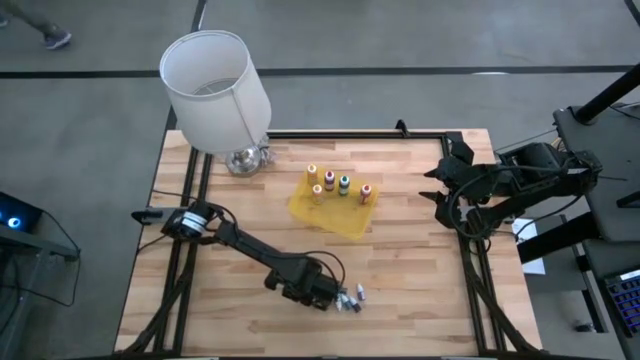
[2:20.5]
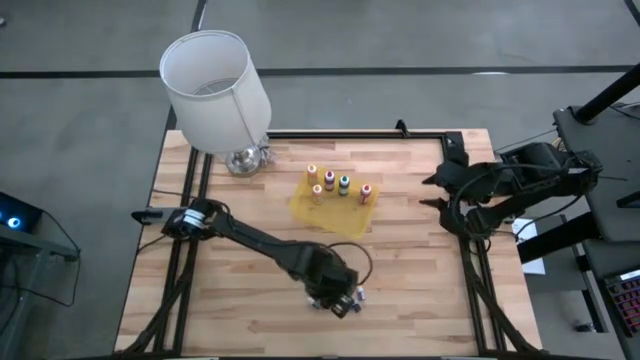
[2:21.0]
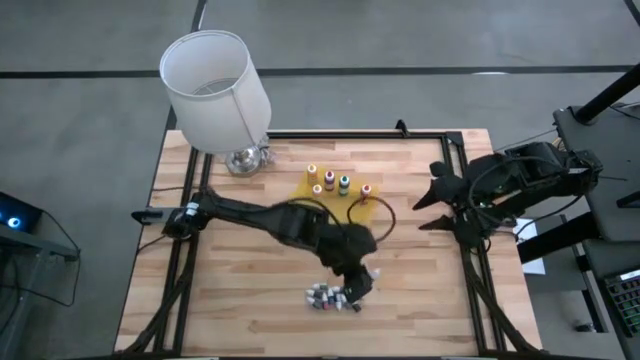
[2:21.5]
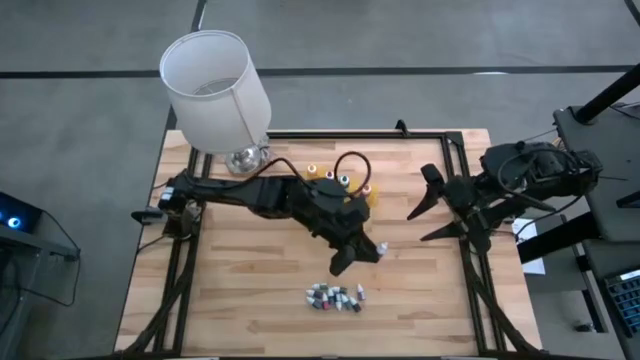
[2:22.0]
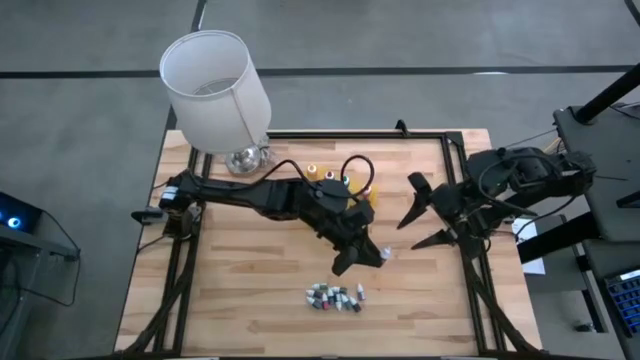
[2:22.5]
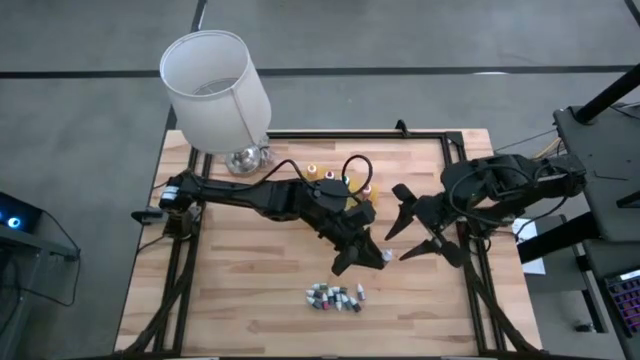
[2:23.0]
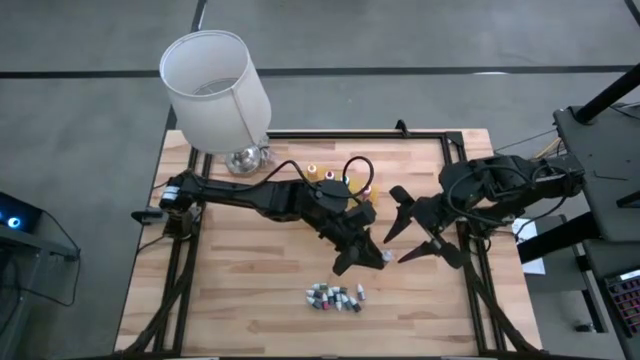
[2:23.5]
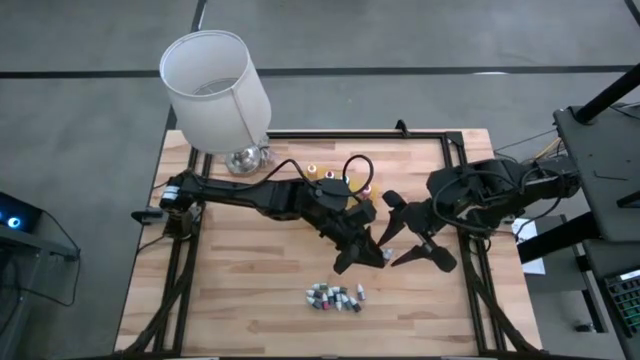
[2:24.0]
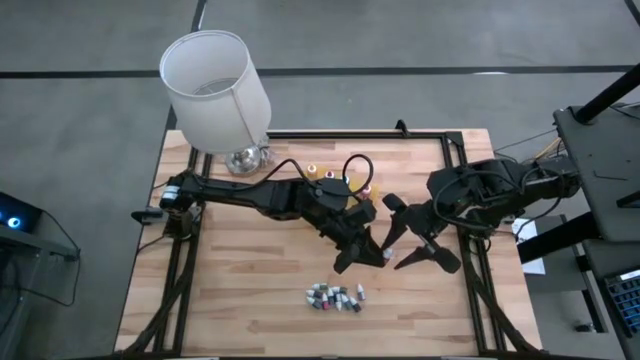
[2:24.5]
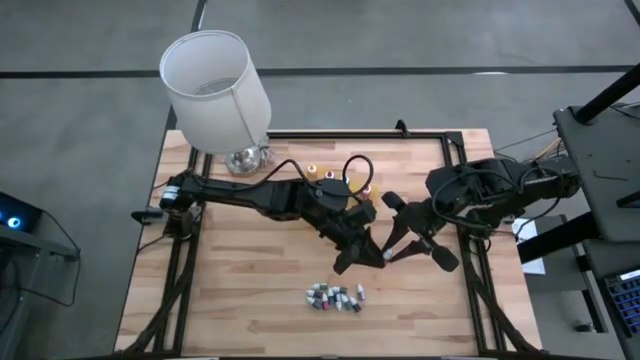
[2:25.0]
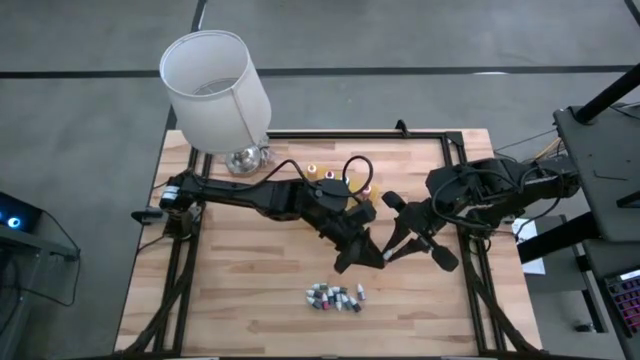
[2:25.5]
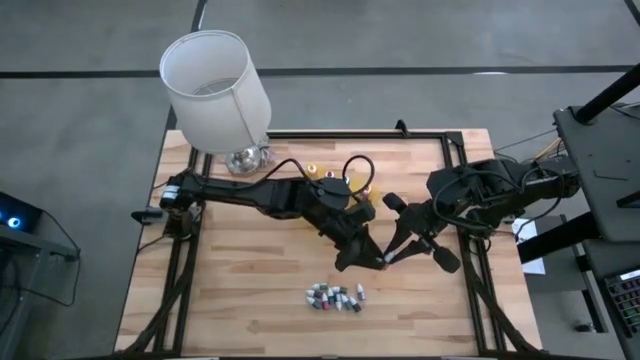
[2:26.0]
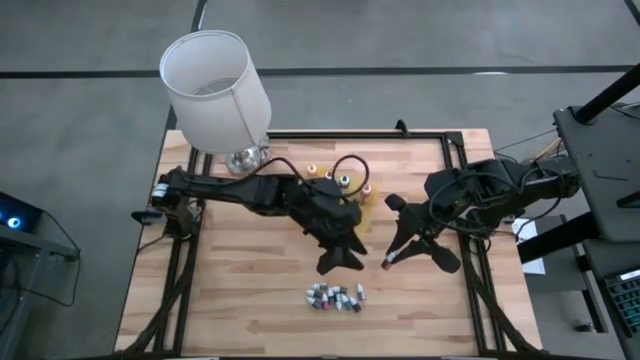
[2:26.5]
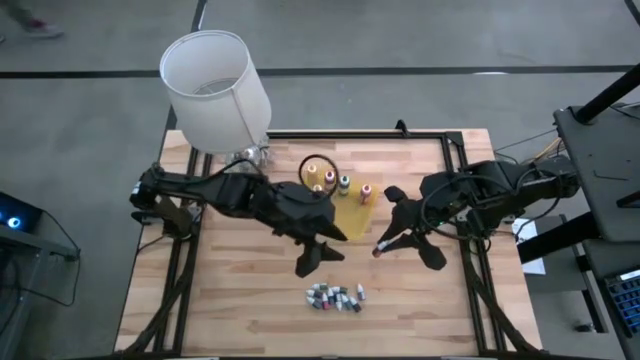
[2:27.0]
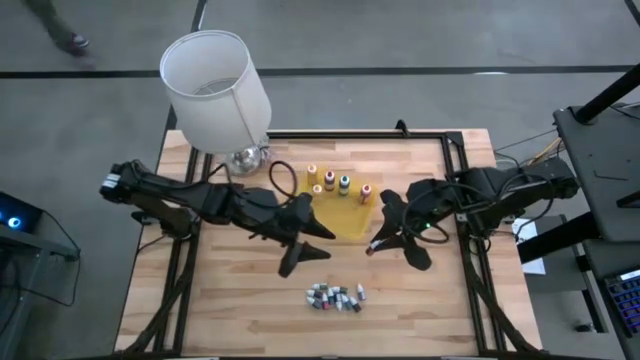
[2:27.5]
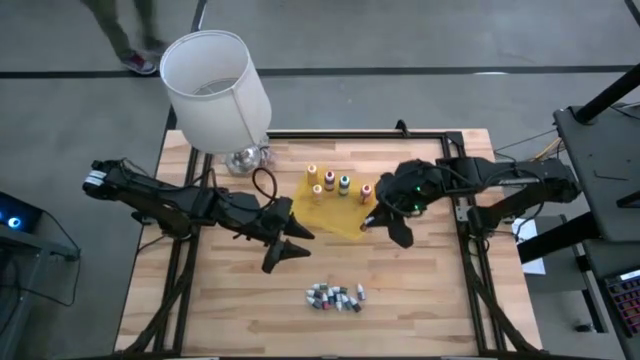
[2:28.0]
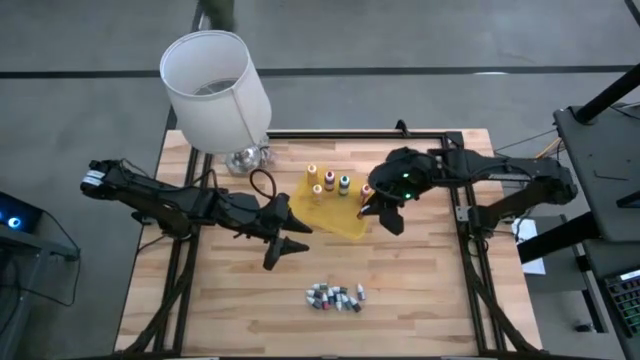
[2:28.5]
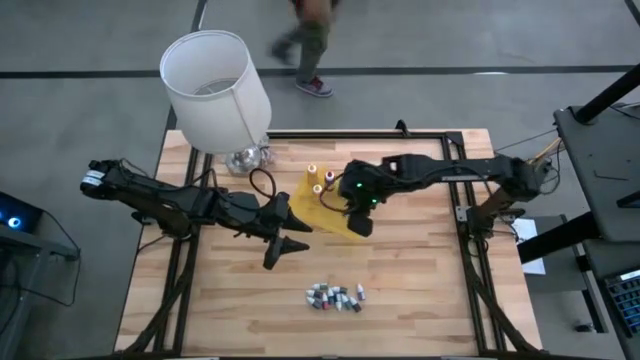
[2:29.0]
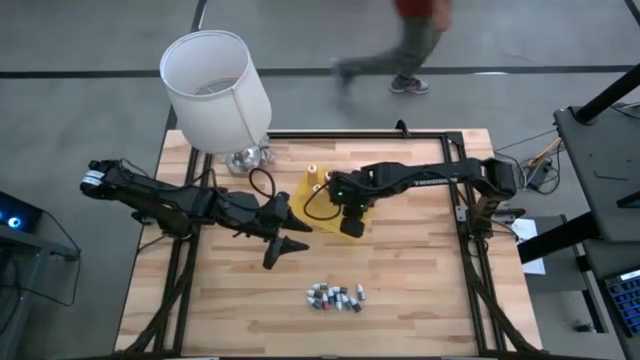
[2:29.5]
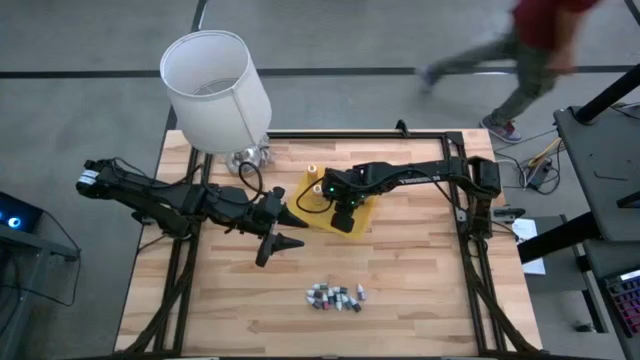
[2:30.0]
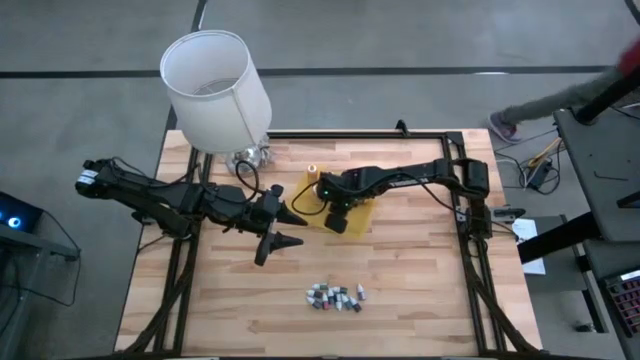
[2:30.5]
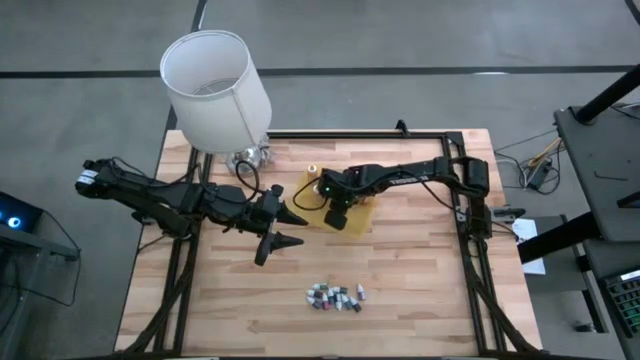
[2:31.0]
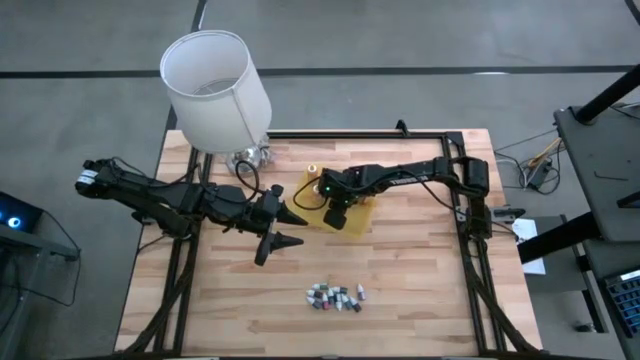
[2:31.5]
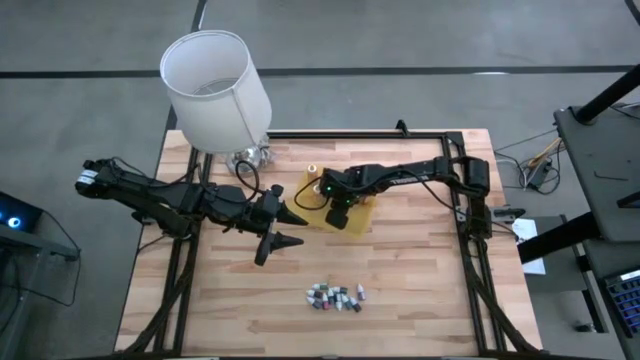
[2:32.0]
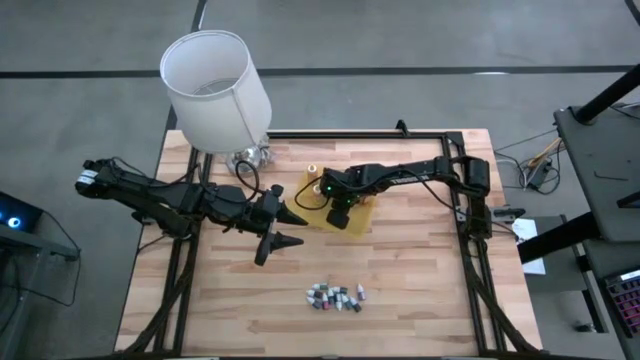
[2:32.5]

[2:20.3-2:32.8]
Task: Pick & Place food coloring
Put the small orange food coloring bottle into the yellow bin

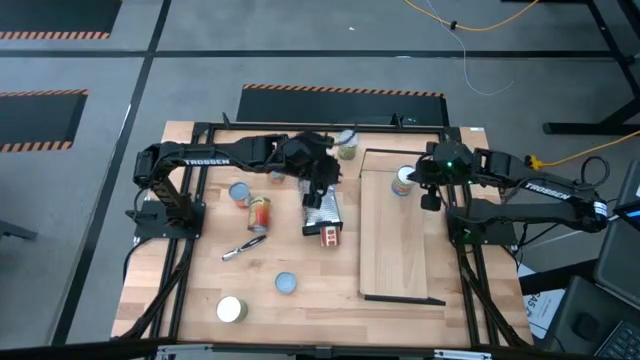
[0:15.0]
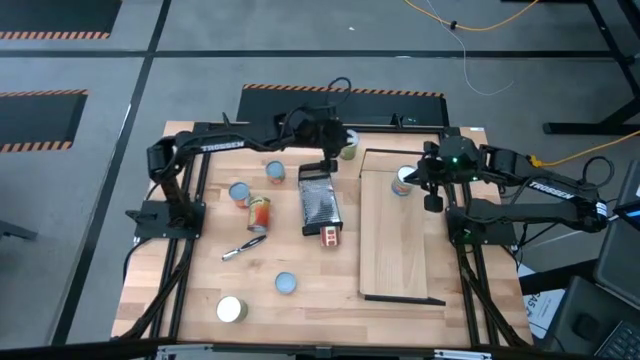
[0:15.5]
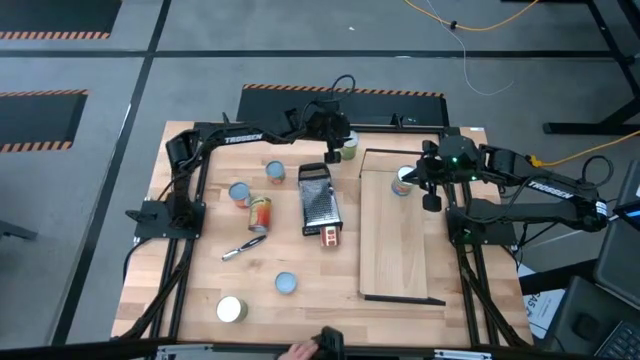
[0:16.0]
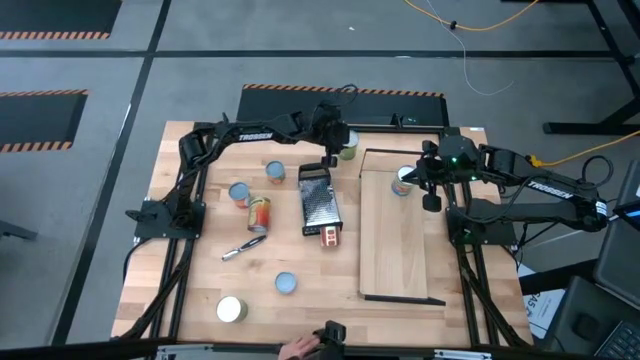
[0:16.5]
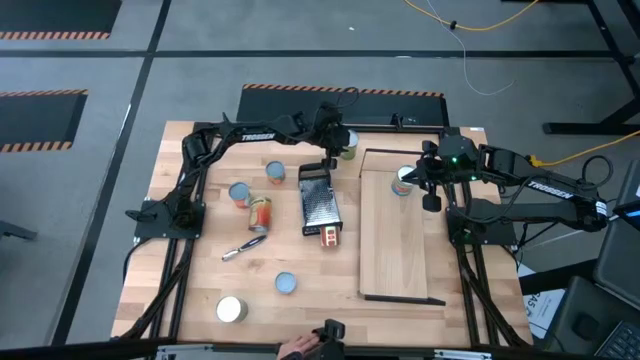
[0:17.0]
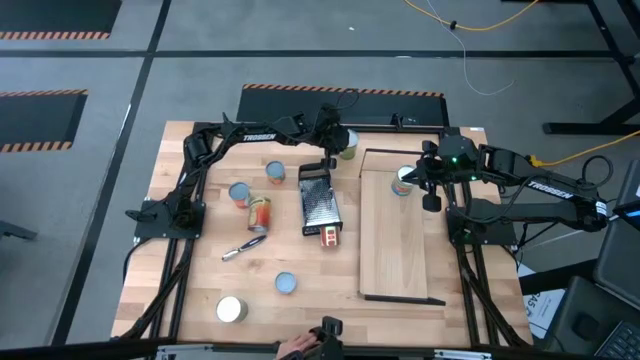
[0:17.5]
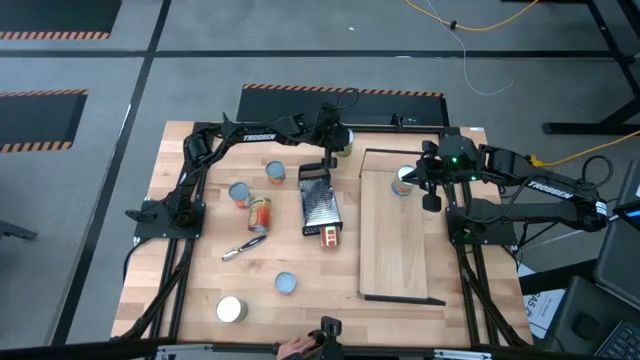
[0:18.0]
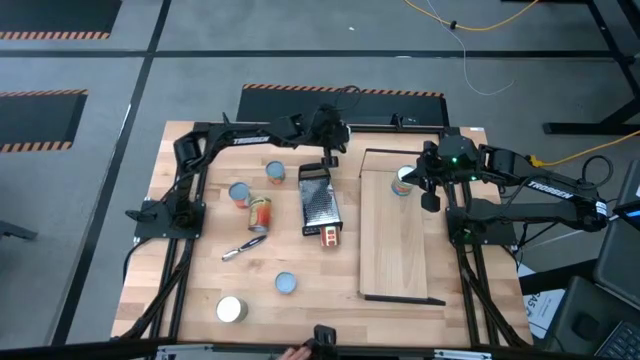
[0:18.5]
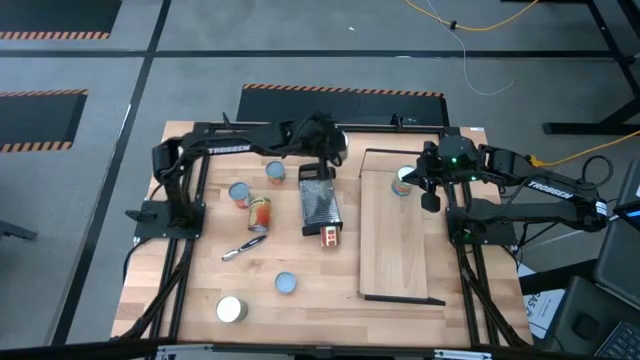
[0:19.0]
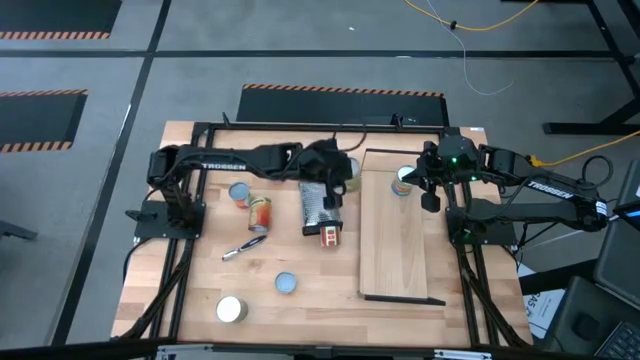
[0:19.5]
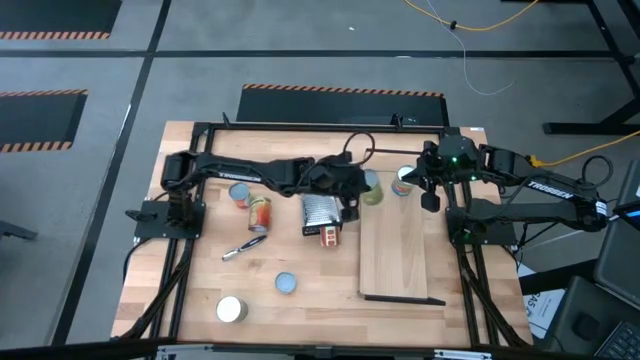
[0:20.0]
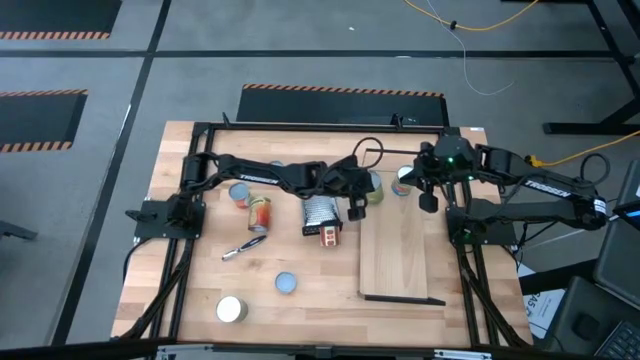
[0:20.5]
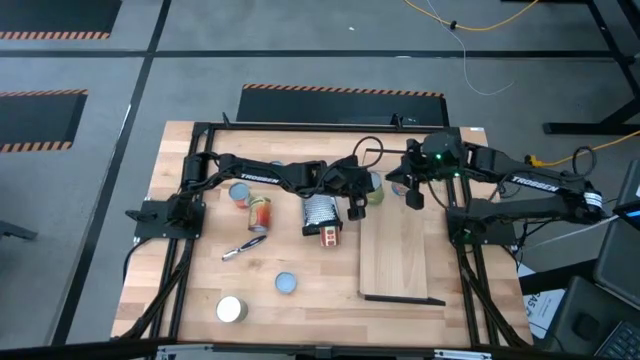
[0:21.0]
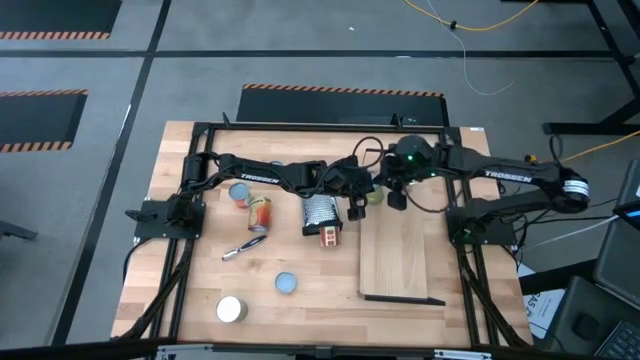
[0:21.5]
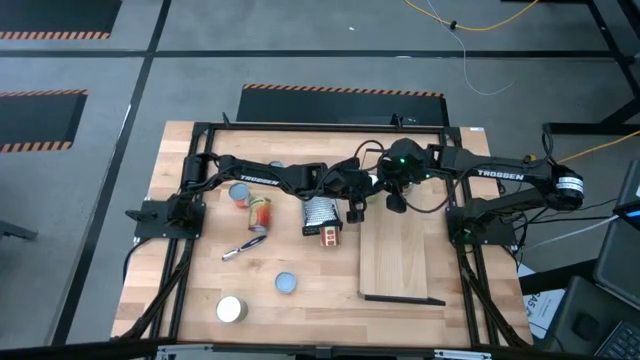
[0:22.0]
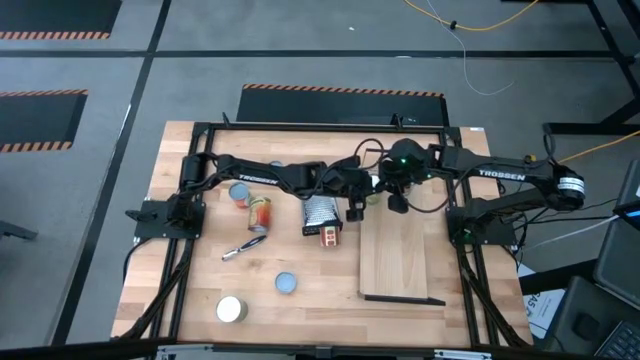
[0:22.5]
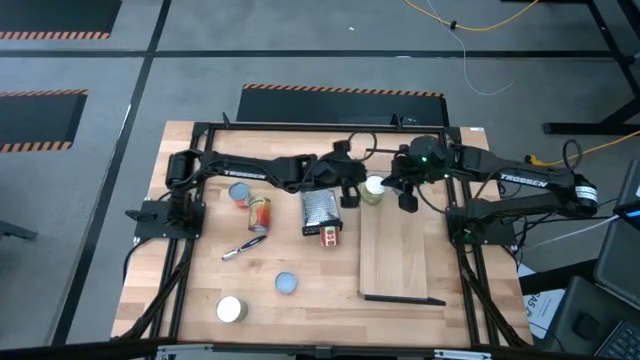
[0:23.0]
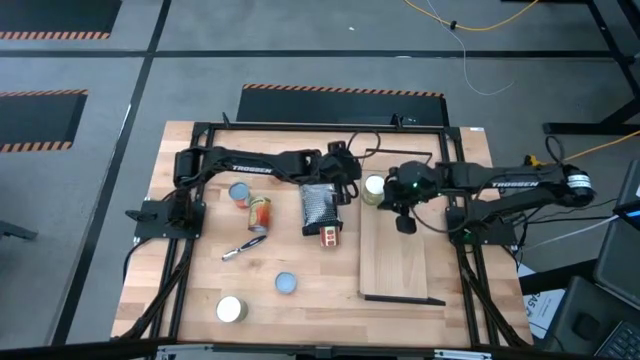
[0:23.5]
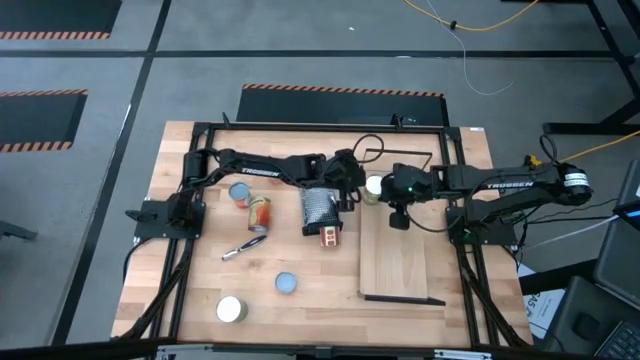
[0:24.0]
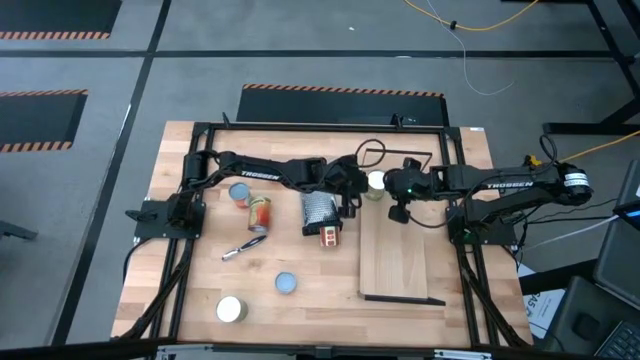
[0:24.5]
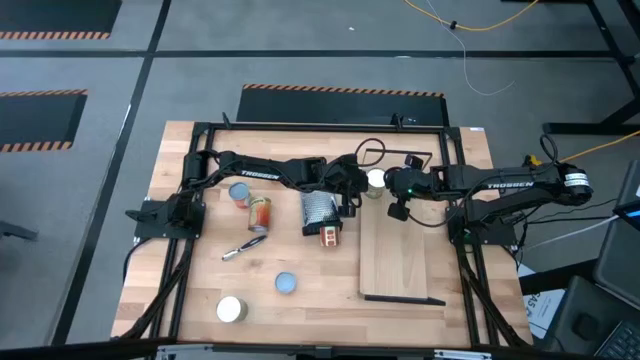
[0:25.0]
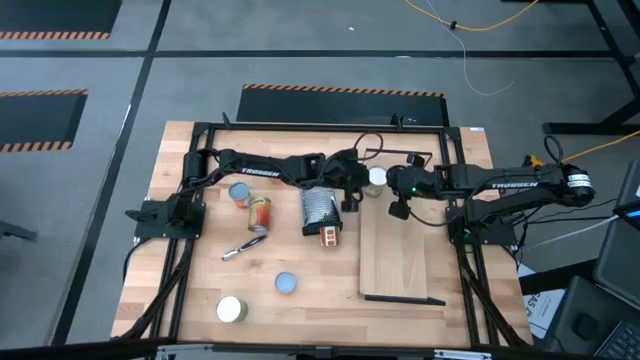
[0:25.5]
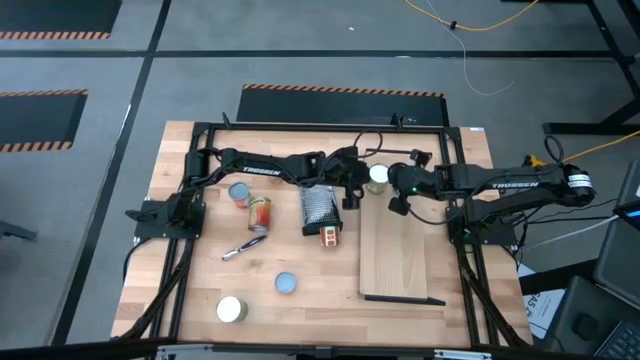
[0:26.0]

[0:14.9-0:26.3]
Task: Pick and place cans onto a shelf
Put the canned pears on the shelf
